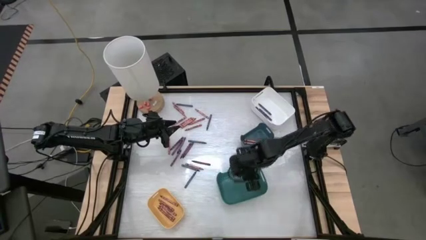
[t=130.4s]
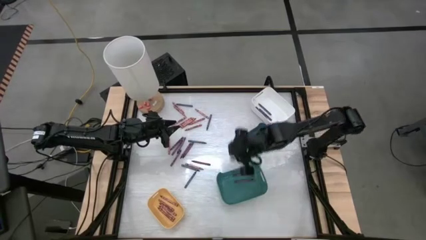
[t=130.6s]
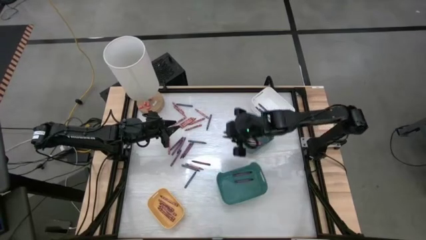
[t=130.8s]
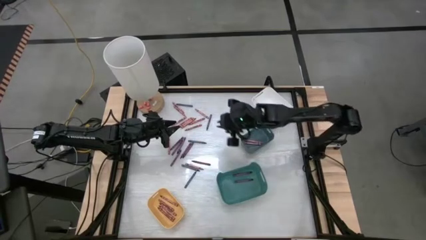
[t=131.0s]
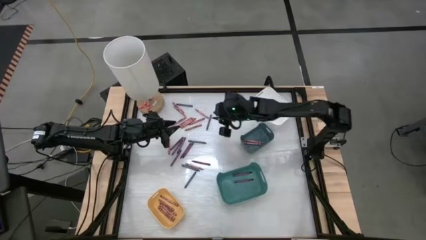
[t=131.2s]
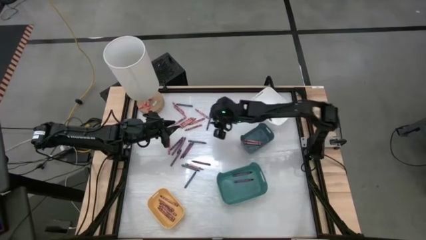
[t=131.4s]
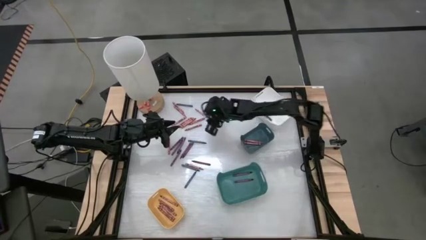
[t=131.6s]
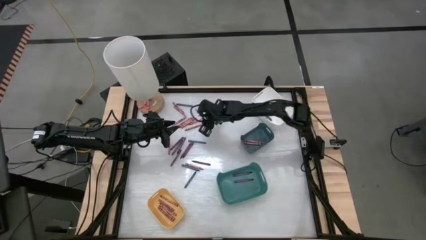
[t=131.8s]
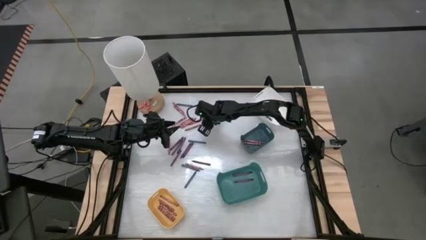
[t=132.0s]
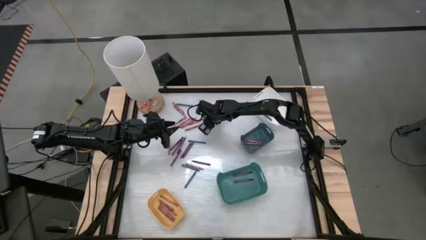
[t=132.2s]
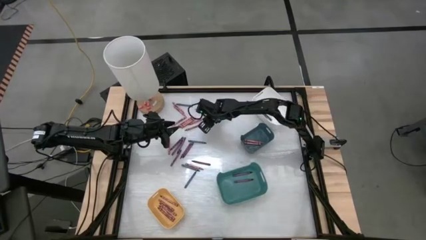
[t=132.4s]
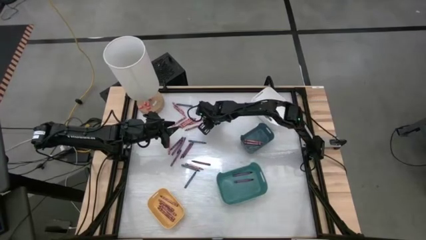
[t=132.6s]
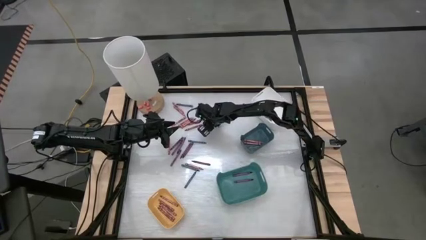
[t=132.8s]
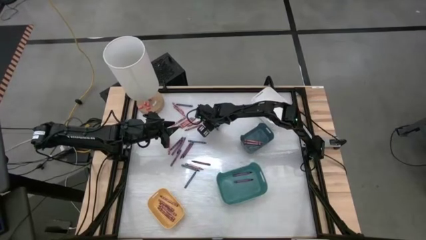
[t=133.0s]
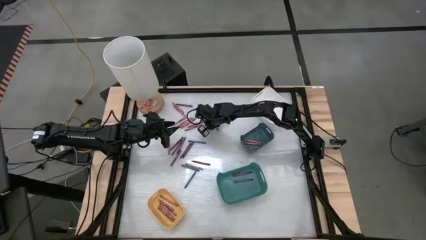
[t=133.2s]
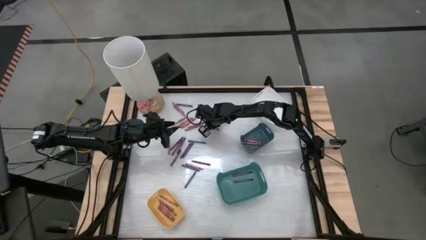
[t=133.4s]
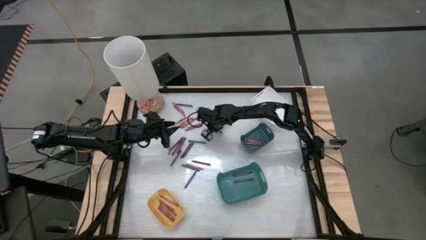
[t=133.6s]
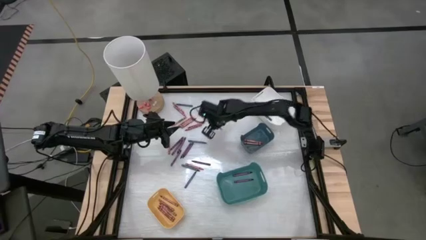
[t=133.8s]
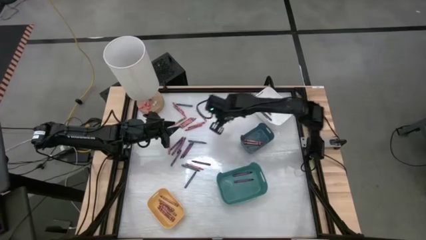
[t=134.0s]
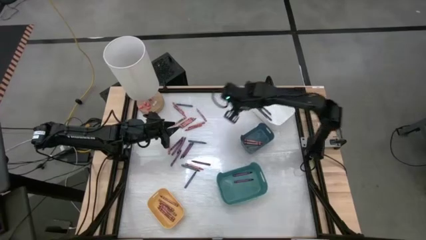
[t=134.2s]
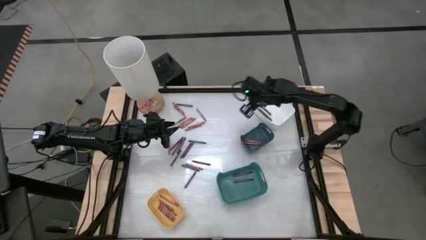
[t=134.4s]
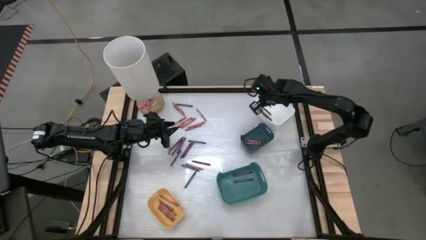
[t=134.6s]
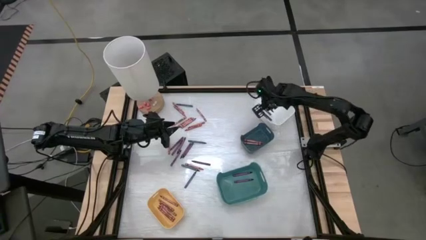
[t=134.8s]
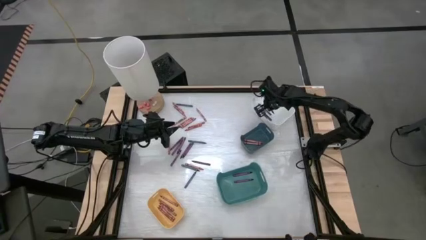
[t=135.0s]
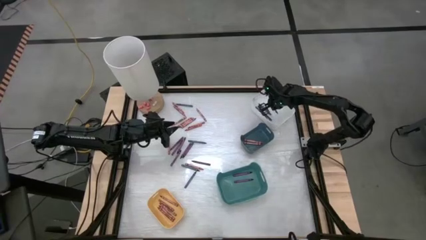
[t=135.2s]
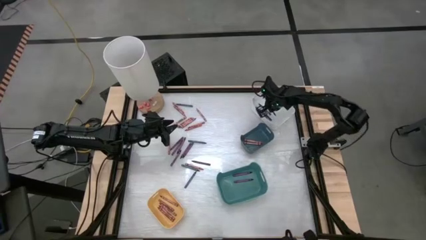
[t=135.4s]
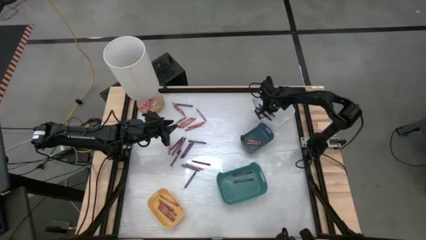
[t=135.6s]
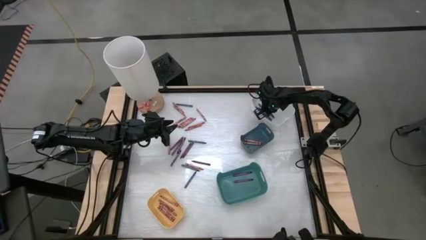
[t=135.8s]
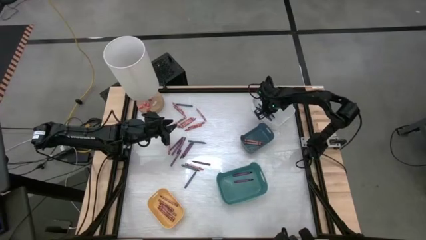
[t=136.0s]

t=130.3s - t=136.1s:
Task: Sort crayons
Put the blue crayon into the white bin

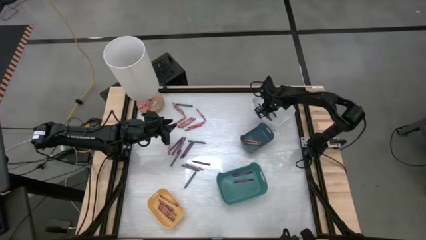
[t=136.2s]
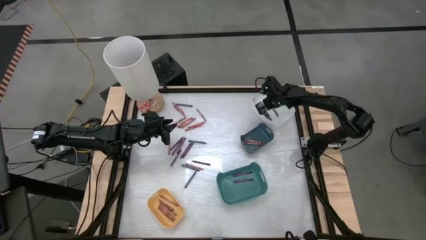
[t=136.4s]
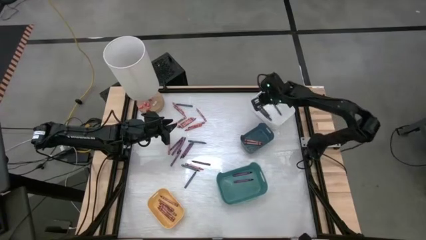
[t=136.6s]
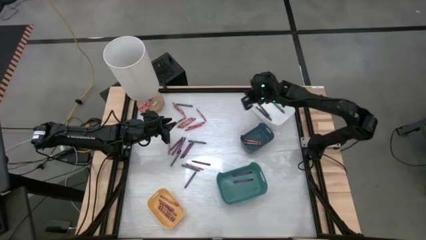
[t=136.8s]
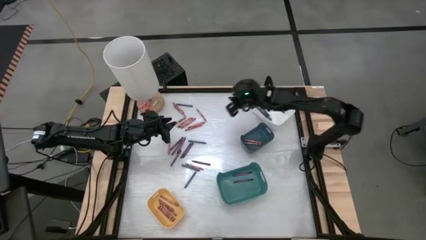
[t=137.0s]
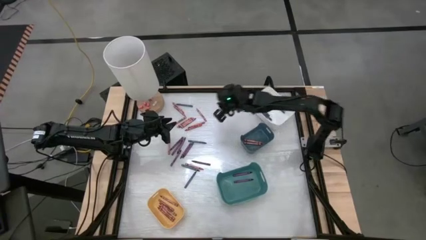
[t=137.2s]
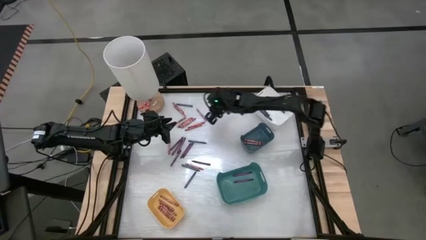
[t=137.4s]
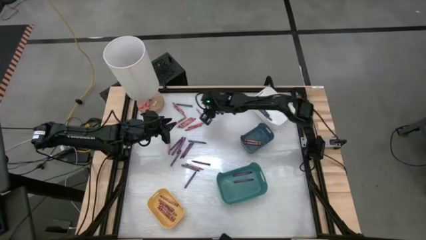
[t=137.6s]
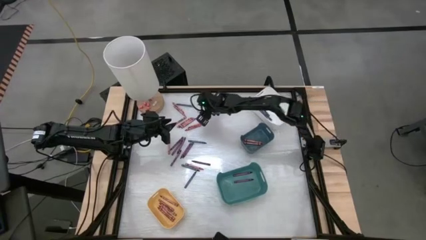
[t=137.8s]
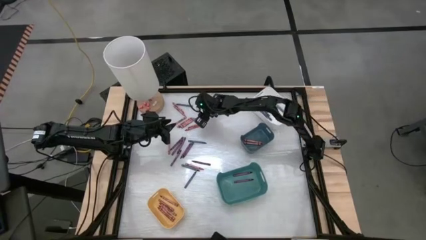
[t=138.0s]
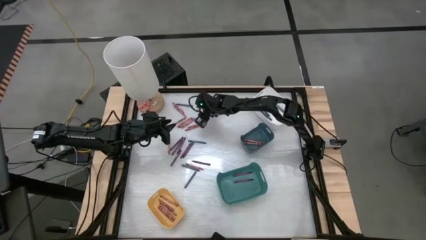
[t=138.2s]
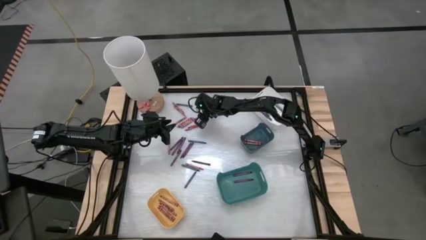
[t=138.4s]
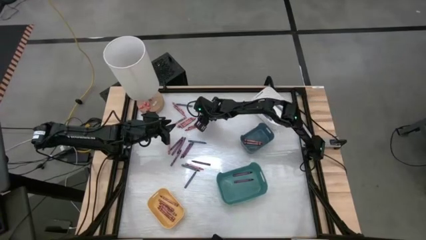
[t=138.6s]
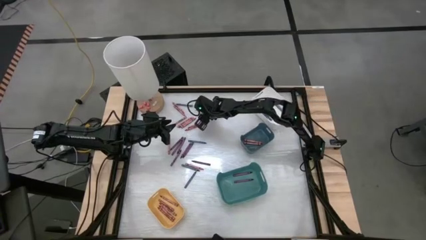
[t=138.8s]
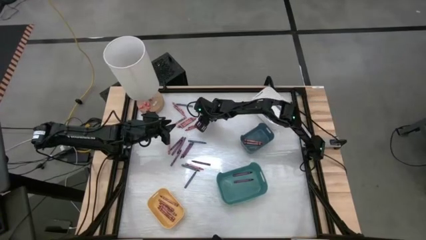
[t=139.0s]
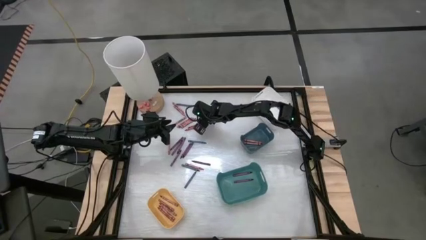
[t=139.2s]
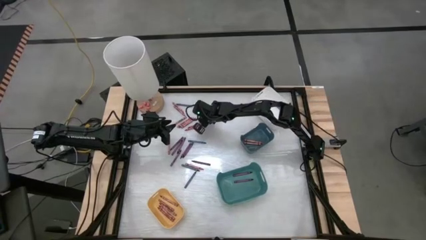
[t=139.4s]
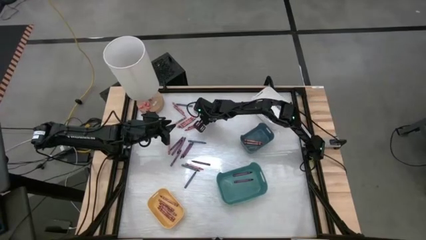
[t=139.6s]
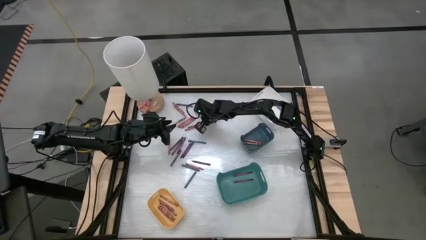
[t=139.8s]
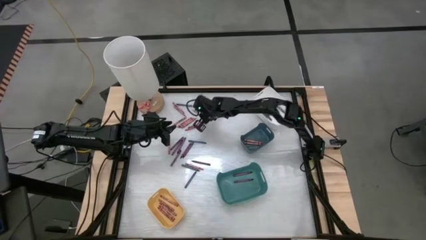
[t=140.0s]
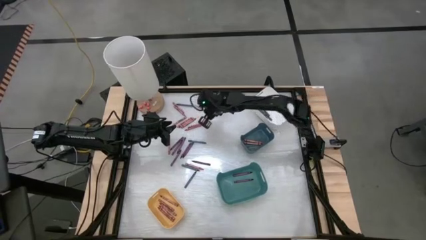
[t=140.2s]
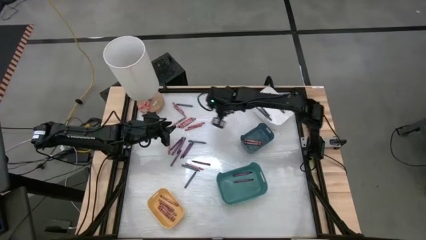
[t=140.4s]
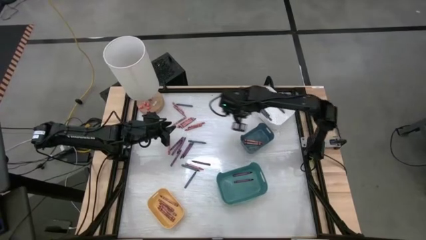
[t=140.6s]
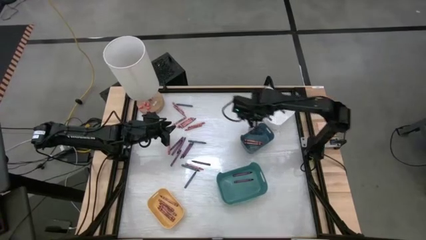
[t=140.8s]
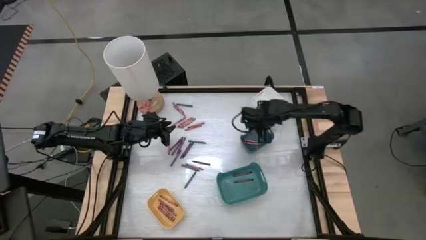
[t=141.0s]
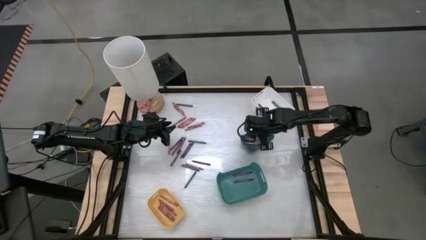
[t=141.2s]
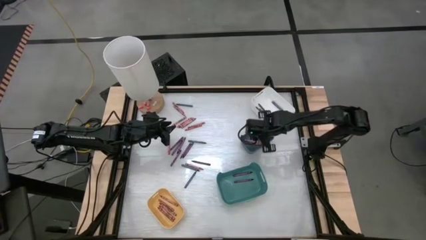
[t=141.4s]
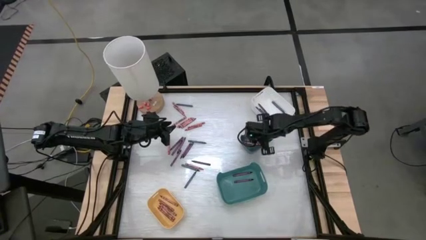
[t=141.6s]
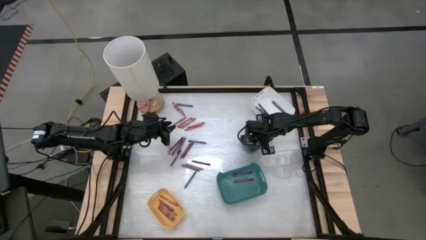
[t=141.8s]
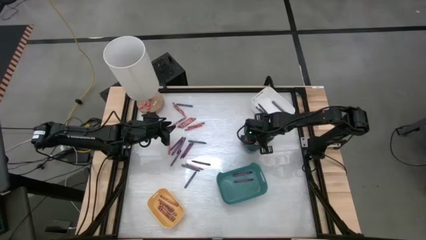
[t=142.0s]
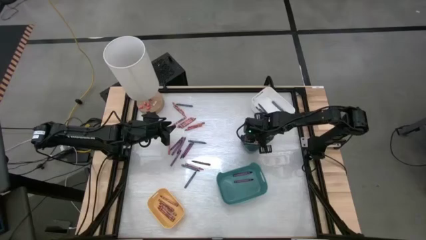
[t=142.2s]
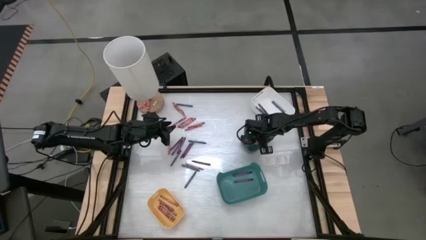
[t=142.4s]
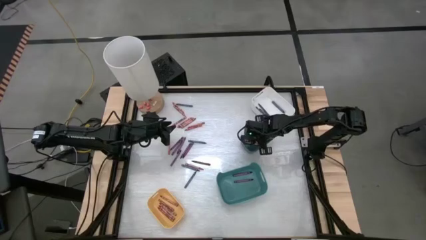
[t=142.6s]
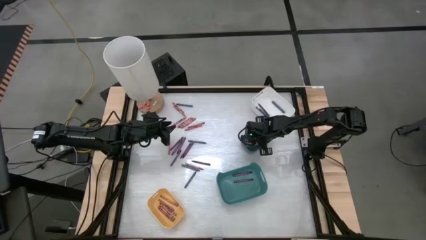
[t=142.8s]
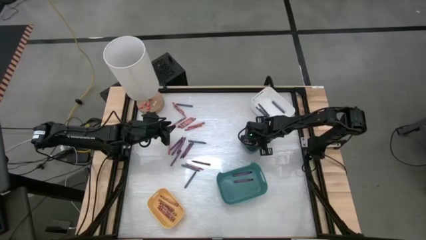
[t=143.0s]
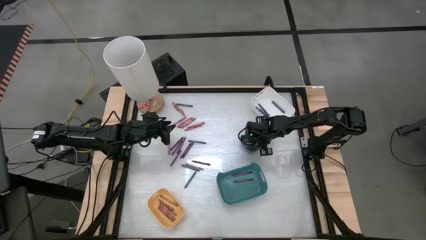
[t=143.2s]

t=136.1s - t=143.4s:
Put the pink crayon into the dark blue bin

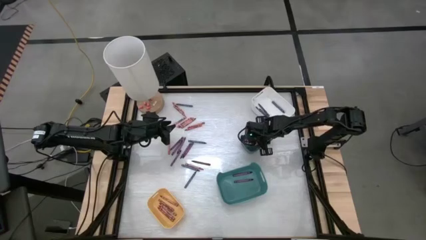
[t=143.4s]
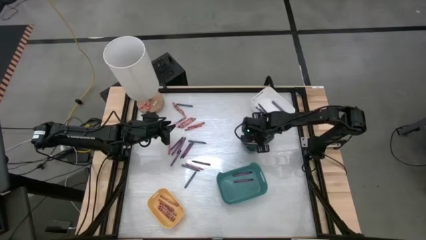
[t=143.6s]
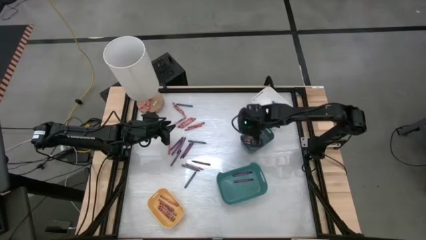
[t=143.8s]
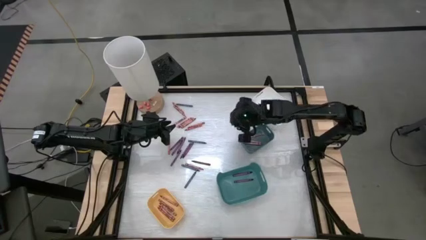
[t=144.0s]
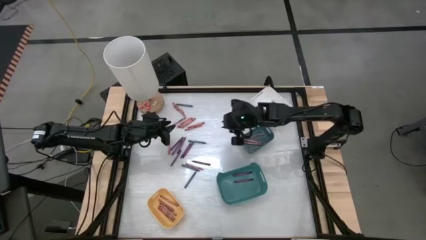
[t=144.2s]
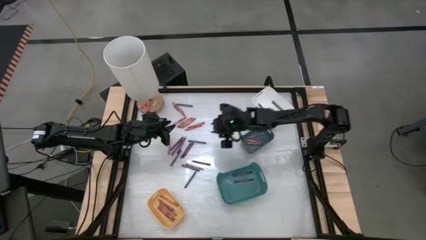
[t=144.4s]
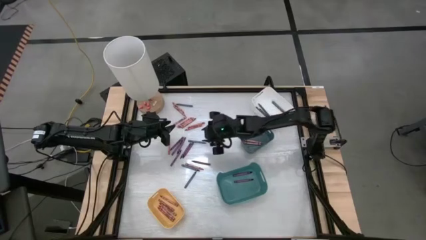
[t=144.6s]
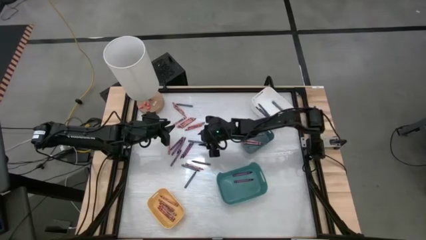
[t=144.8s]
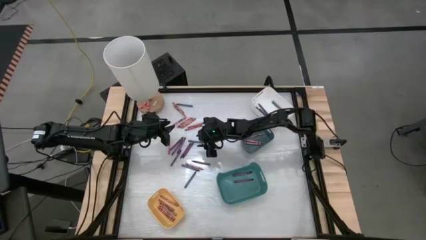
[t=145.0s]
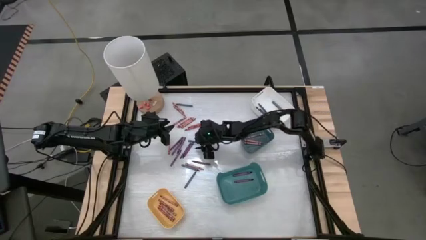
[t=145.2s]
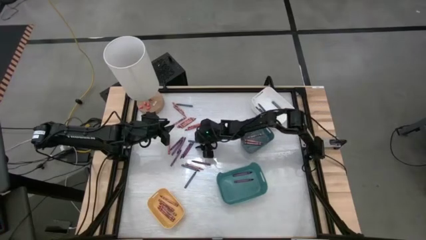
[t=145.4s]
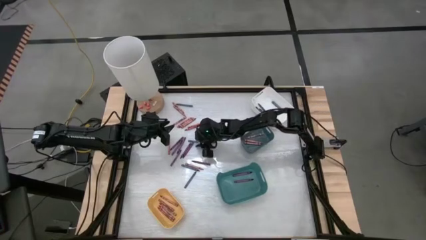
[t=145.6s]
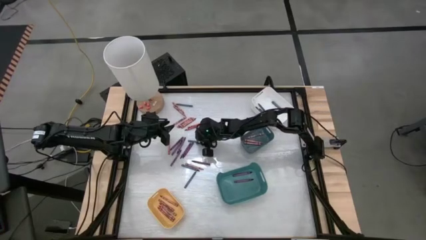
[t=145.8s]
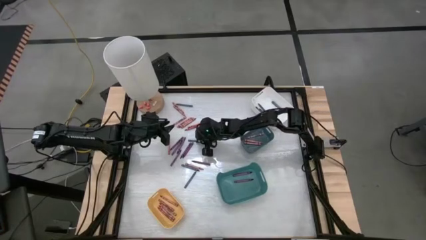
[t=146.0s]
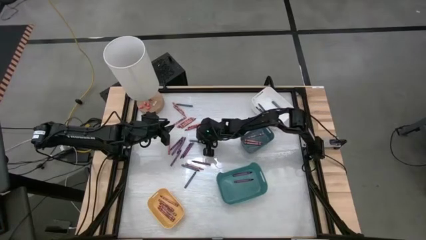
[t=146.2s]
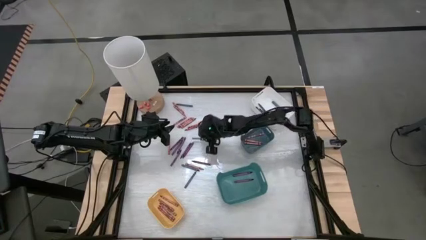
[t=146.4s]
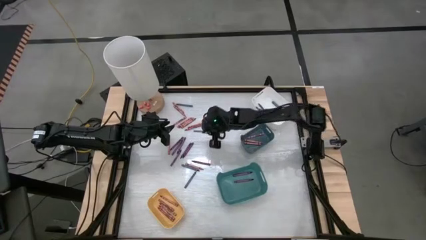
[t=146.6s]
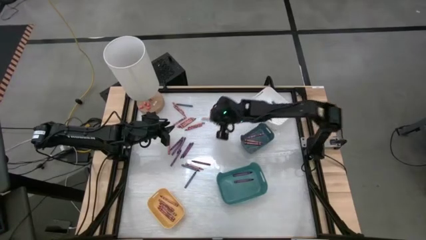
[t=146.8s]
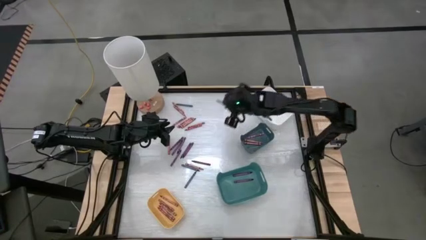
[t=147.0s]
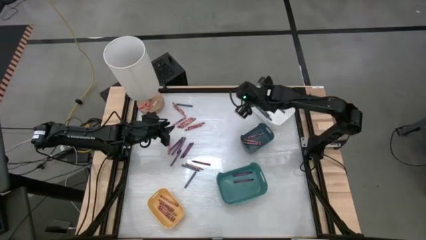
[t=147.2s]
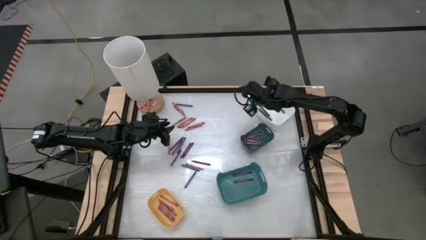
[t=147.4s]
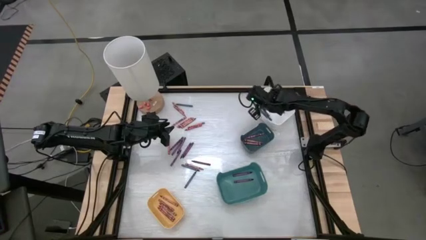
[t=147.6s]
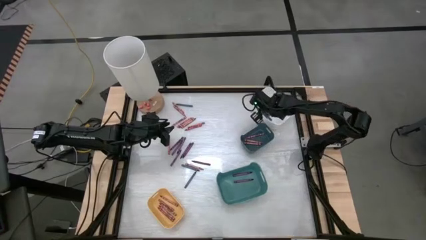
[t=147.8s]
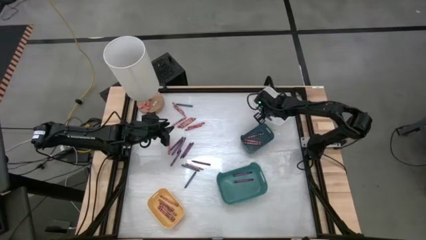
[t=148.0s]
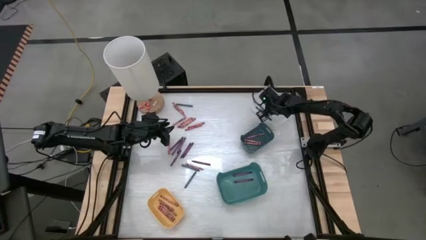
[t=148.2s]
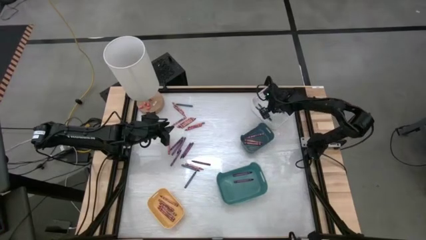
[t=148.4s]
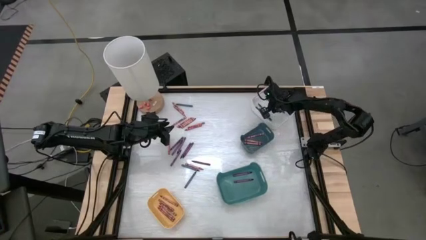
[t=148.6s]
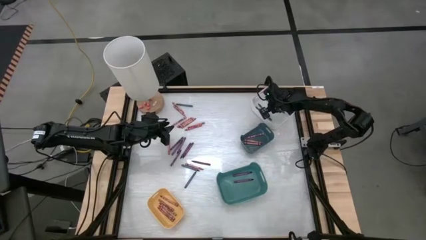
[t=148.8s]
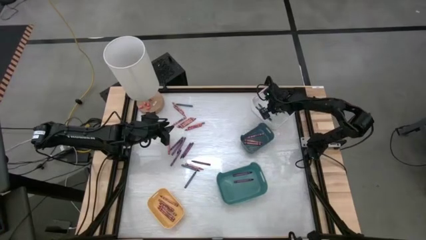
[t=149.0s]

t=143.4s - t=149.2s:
Put the blue crayon into the white bin
